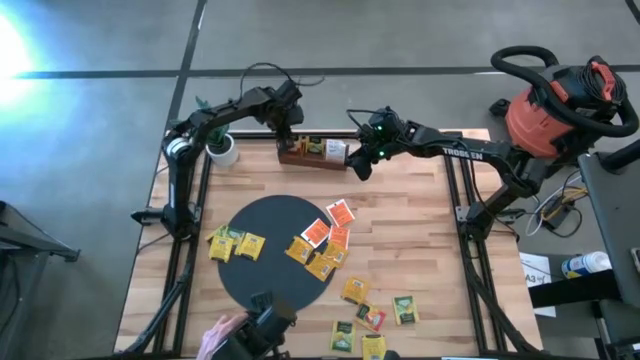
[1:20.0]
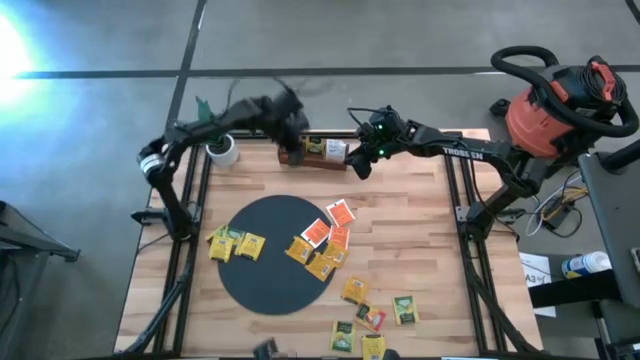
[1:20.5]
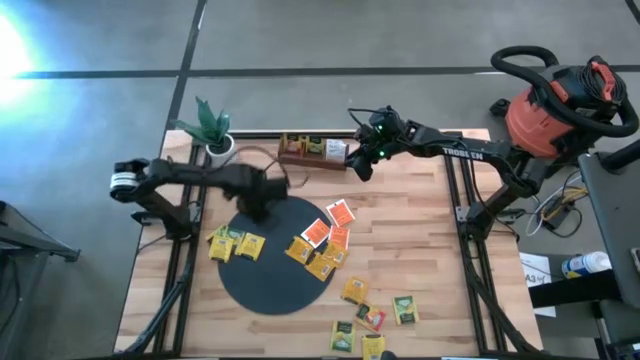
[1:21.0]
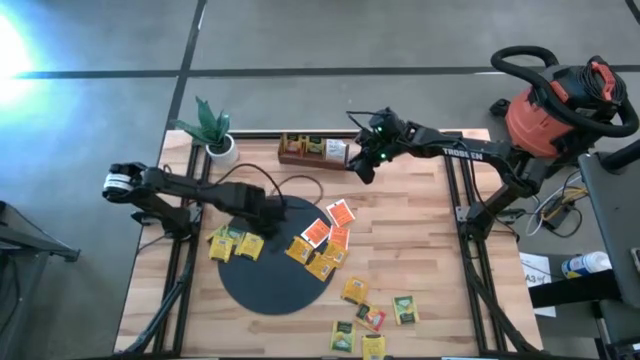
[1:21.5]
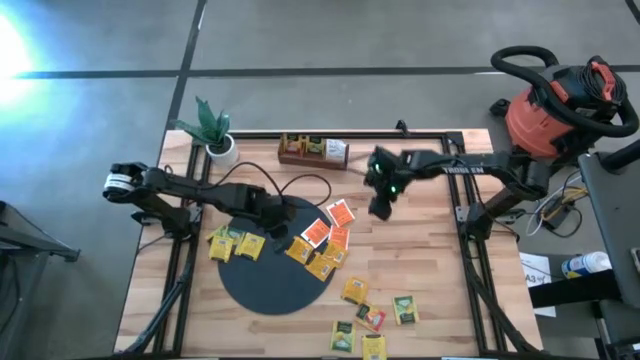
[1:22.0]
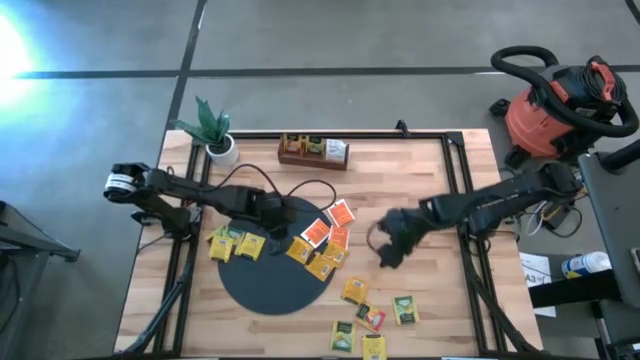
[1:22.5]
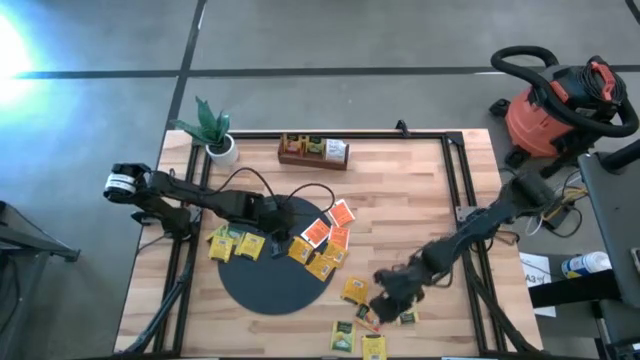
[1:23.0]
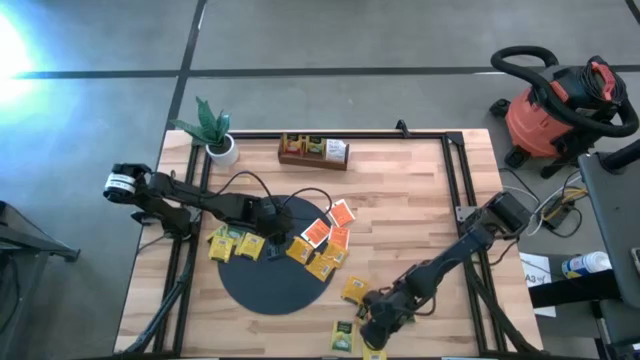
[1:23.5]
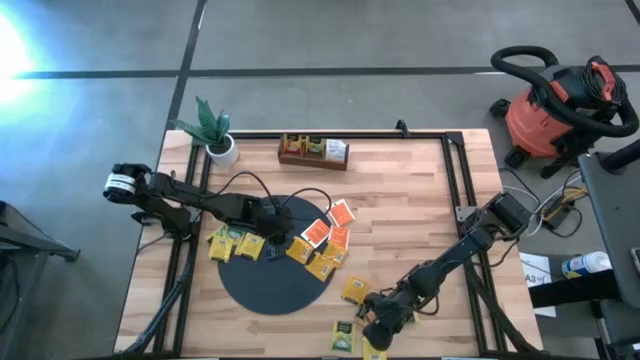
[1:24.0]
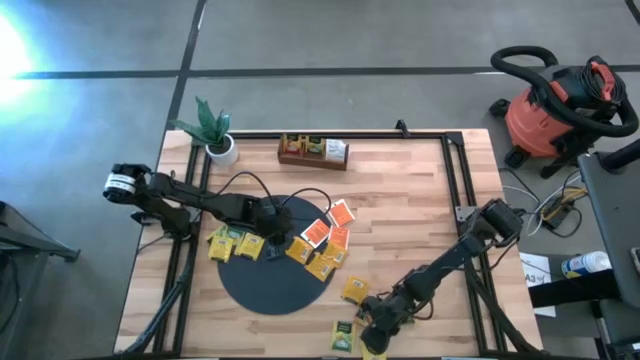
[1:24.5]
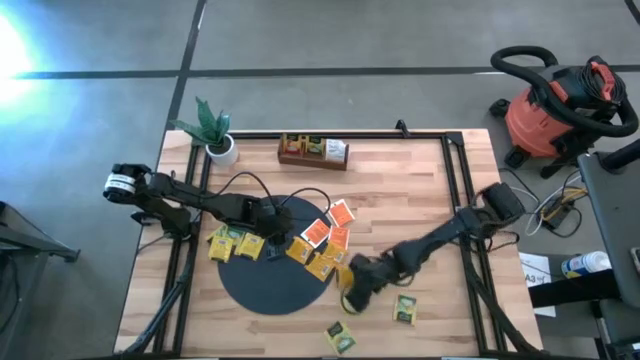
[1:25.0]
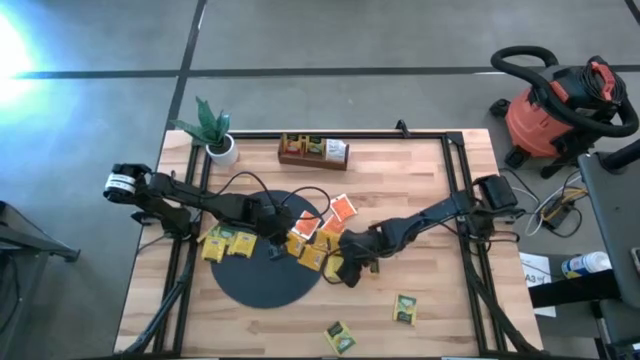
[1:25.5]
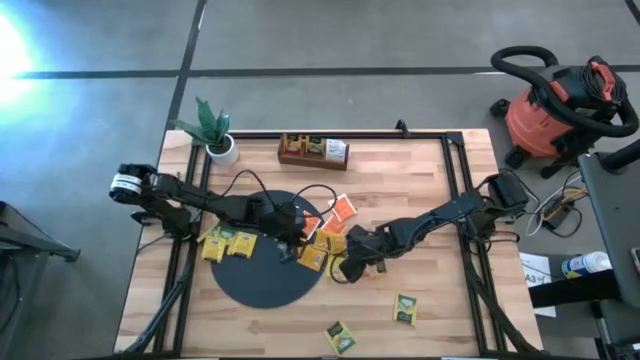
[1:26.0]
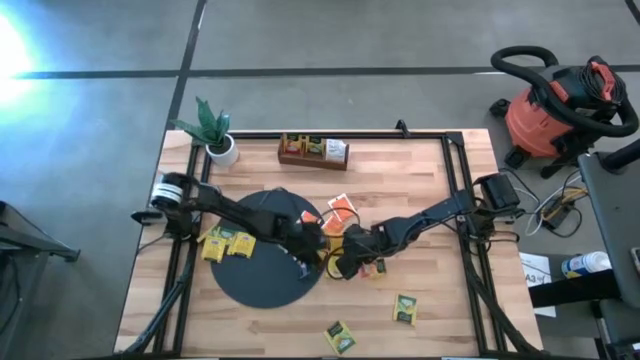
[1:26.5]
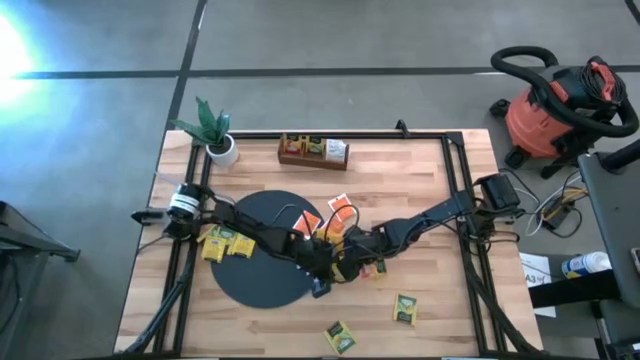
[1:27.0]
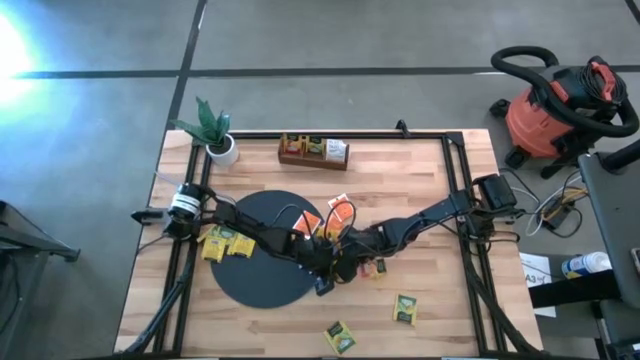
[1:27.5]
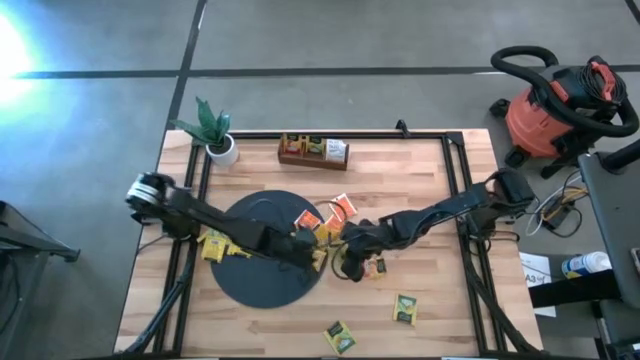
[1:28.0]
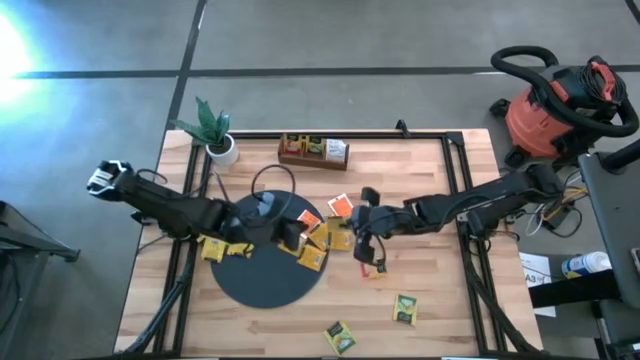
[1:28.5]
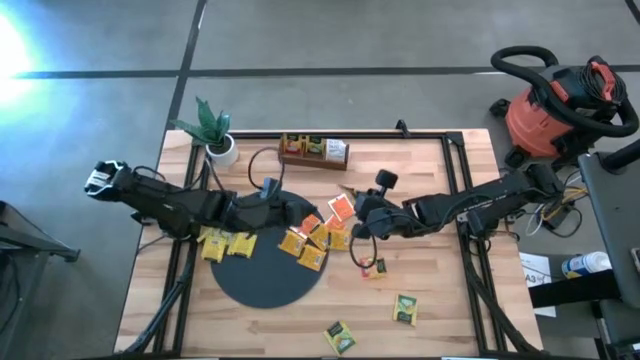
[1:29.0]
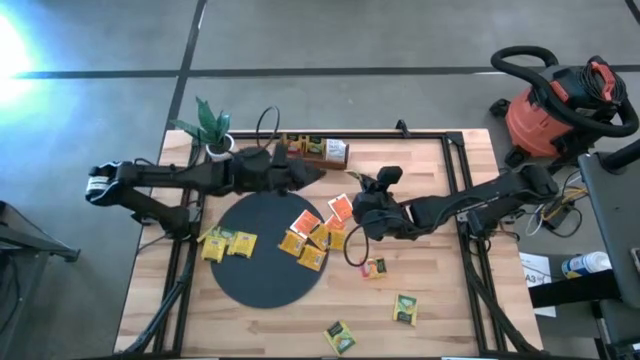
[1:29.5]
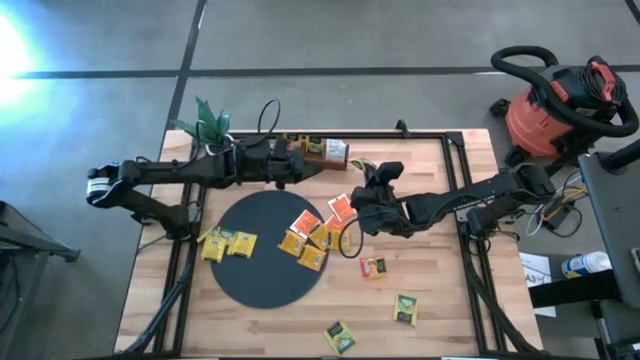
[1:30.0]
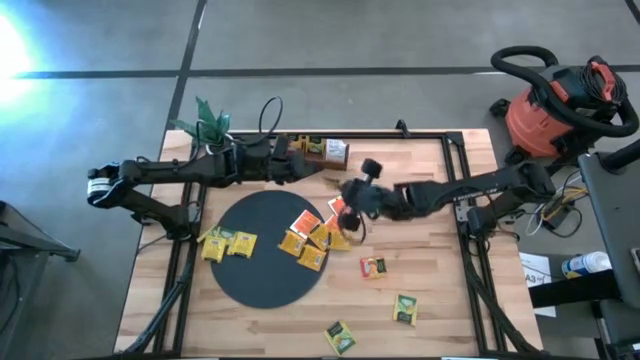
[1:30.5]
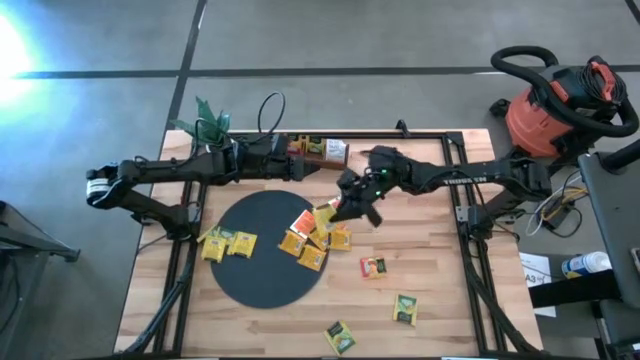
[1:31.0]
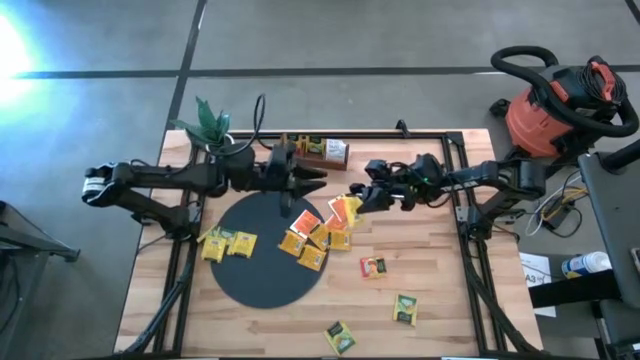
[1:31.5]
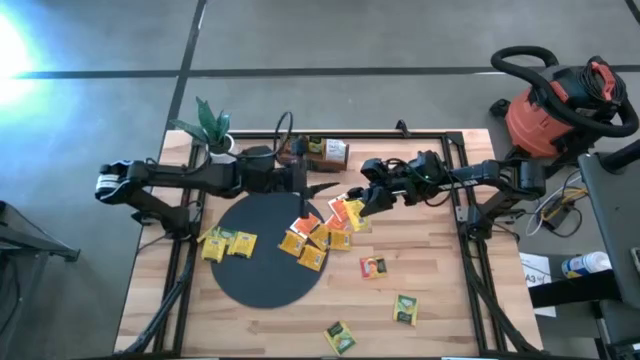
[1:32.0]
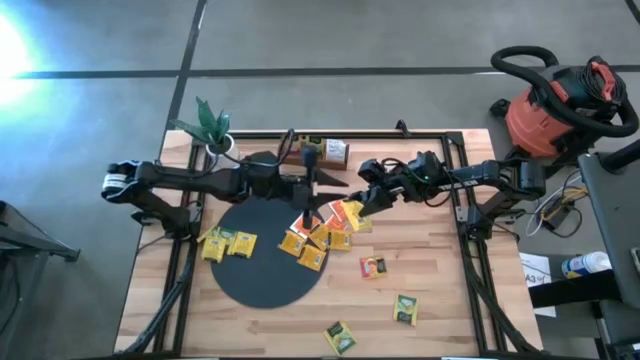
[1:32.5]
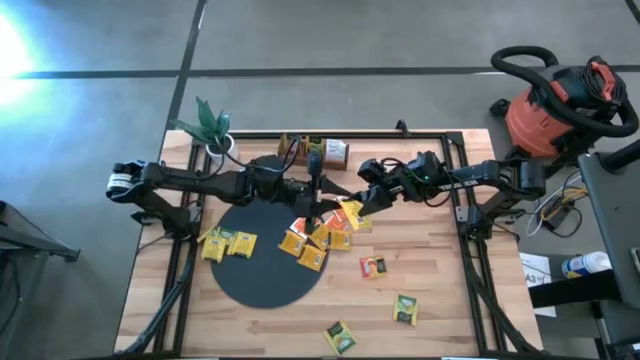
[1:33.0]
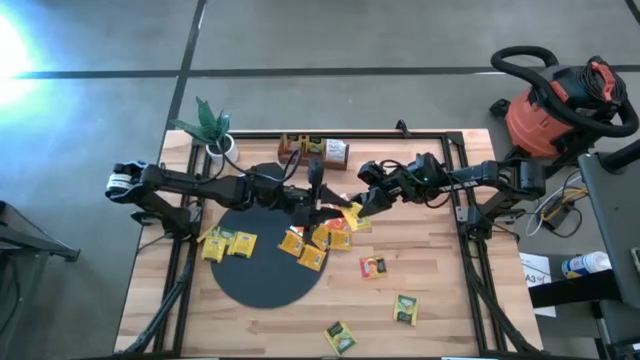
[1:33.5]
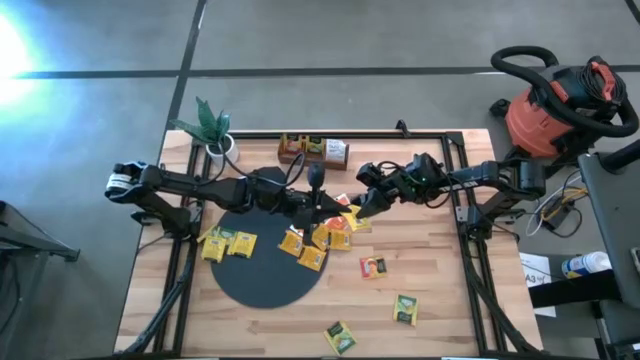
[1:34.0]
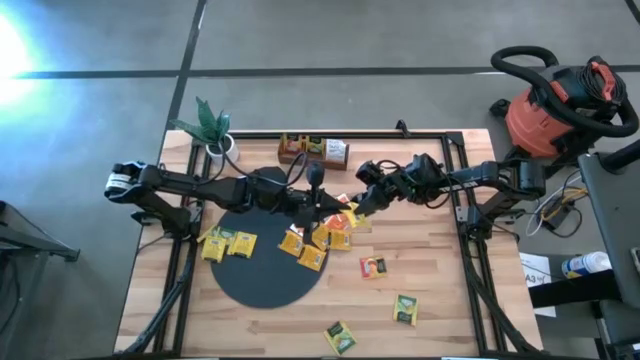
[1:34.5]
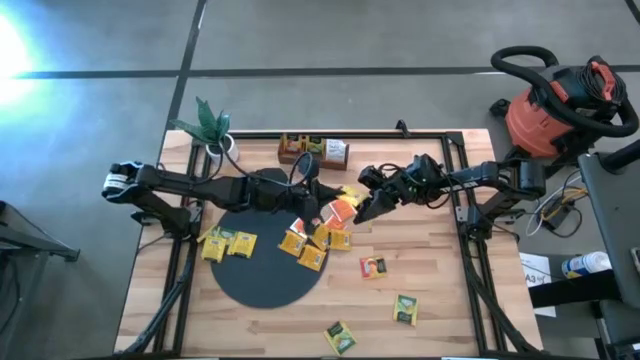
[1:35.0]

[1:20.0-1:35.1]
Task: Pick & Place Tea
Put the yellow tea bag into the middle section of the wooden organizer

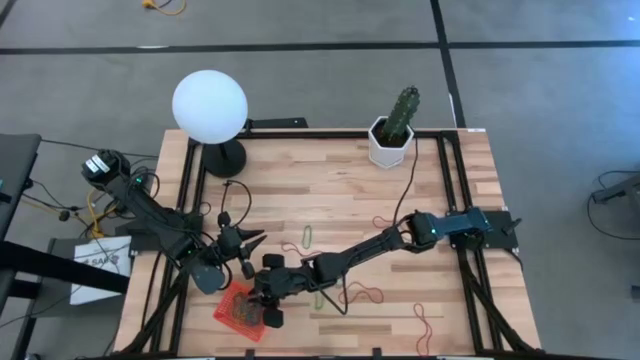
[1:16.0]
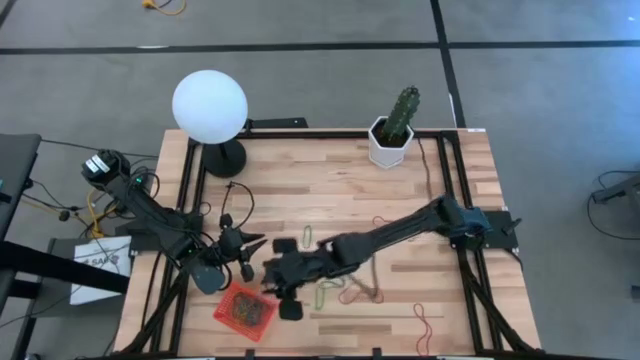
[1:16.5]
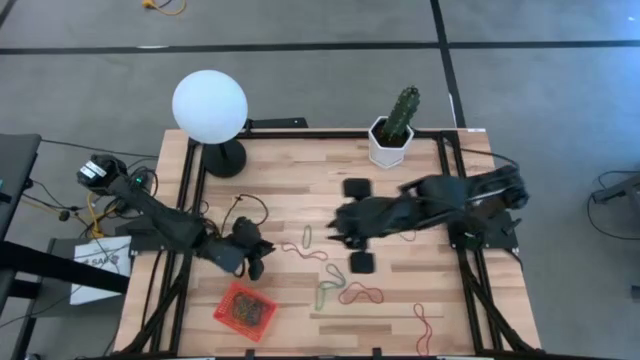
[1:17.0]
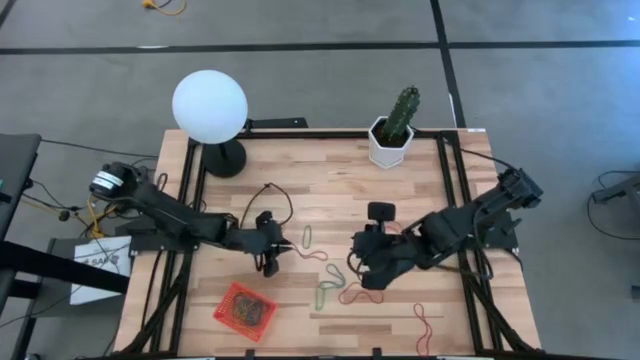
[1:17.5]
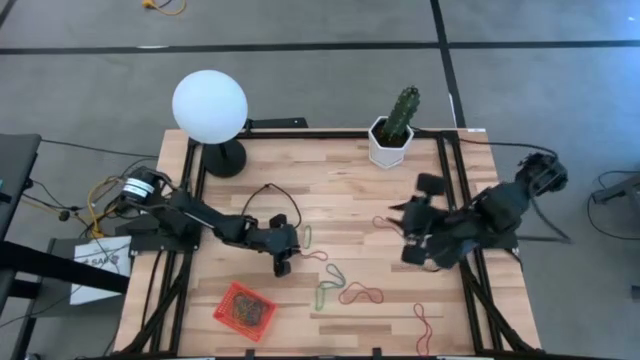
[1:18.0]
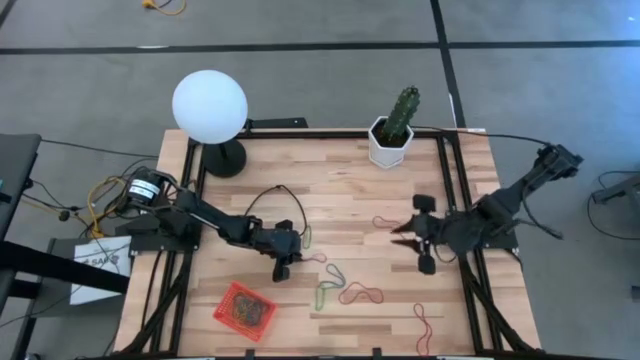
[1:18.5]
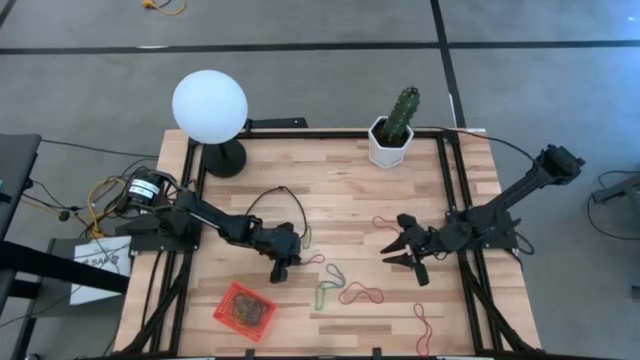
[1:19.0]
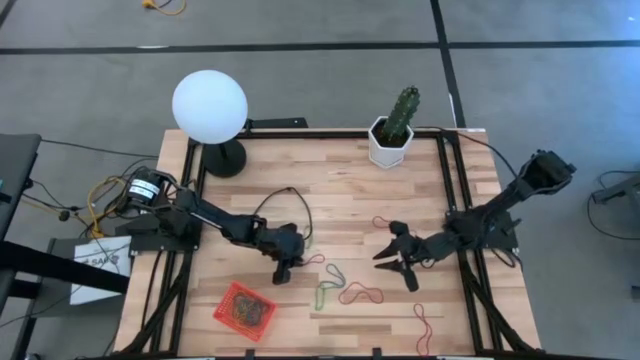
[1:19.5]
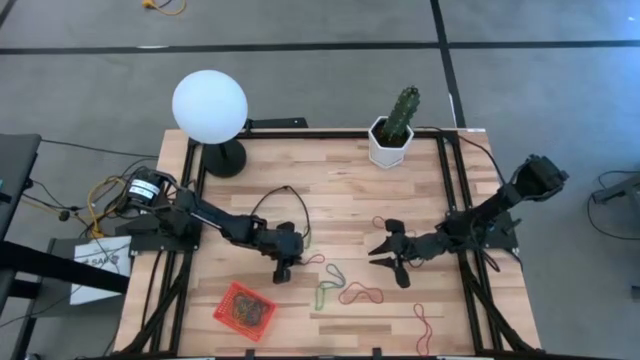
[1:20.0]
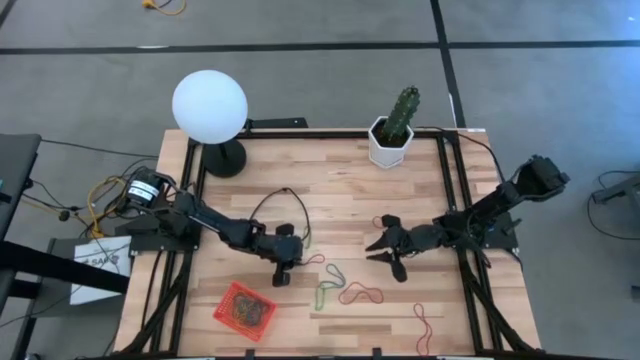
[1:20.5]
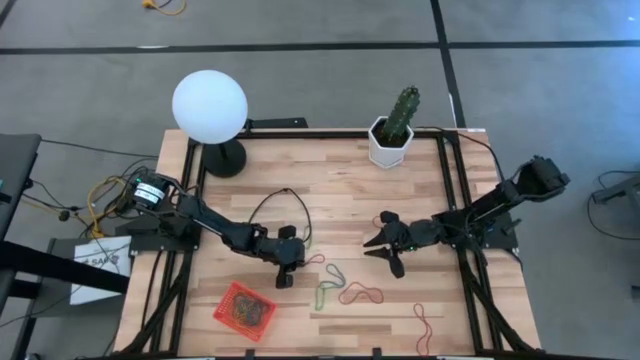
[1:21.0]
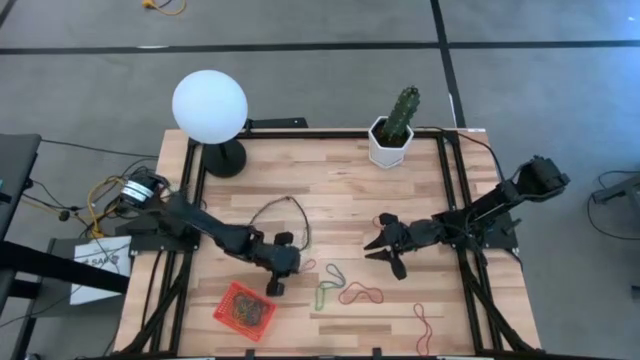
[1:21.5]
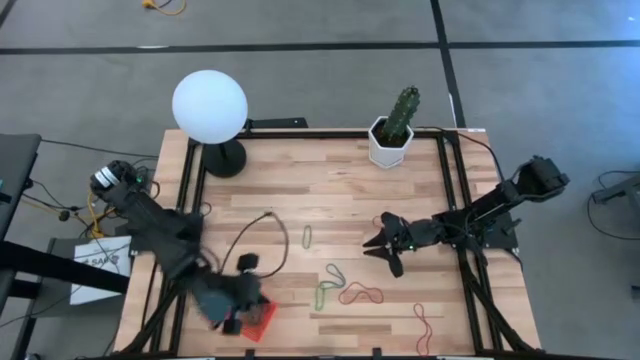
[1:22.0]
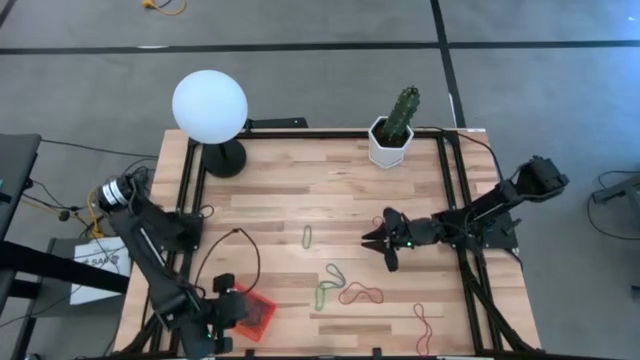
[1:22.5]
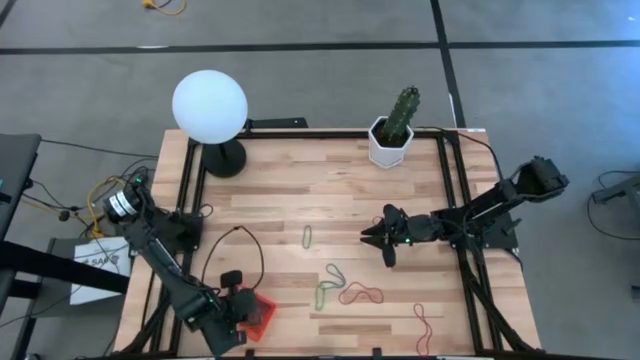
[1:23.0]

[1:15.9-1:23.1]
Task: Pick and place rubber bands into bin
Put the red rubber band into the basket
